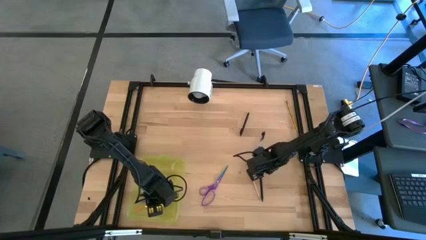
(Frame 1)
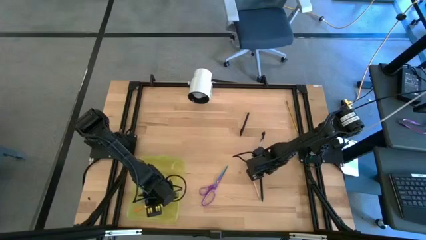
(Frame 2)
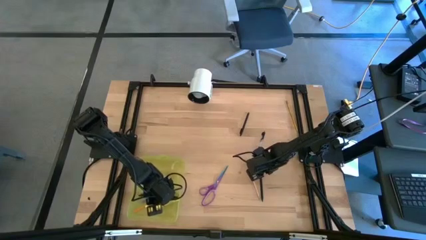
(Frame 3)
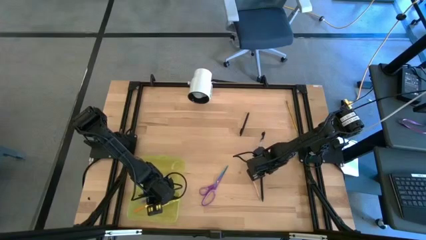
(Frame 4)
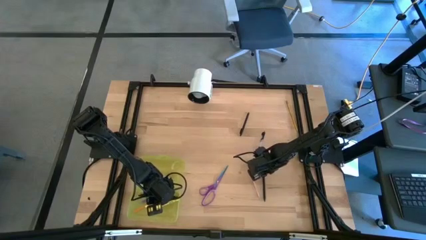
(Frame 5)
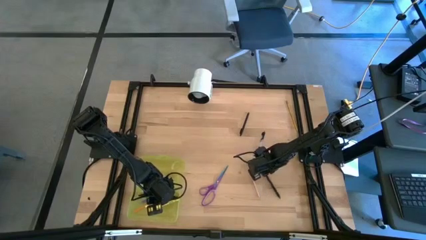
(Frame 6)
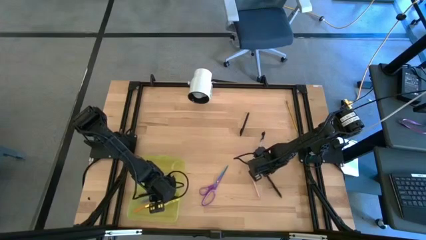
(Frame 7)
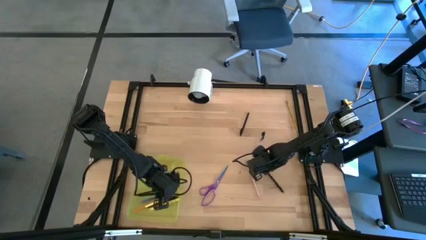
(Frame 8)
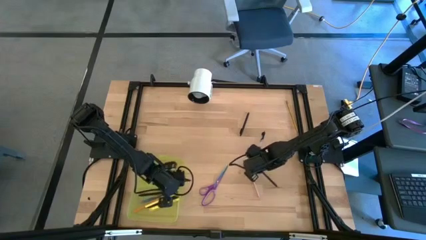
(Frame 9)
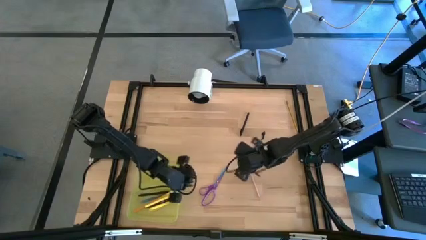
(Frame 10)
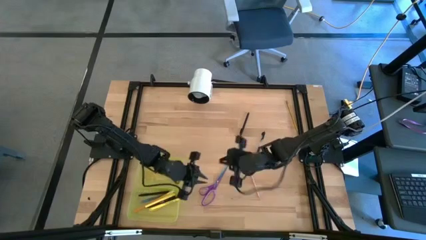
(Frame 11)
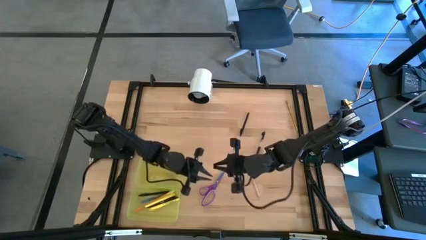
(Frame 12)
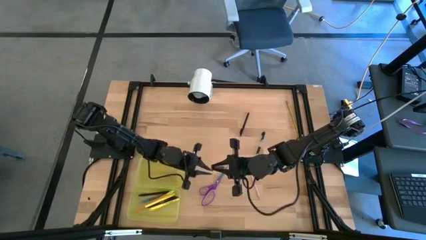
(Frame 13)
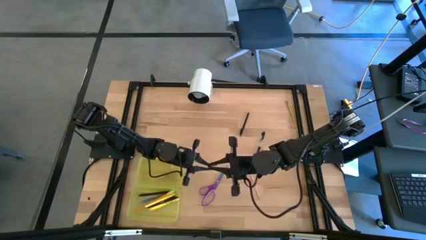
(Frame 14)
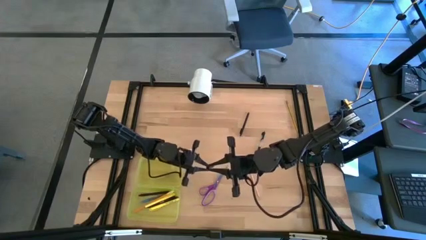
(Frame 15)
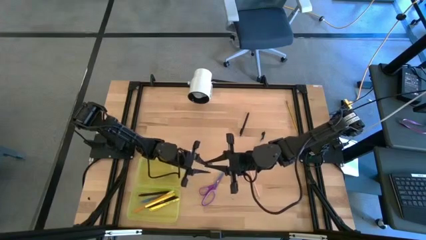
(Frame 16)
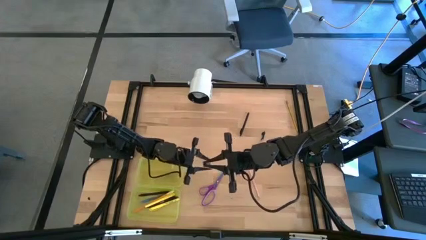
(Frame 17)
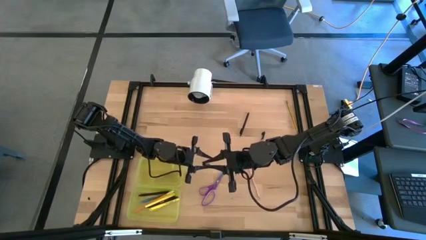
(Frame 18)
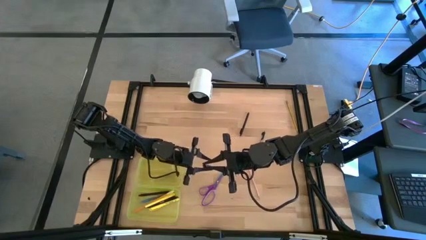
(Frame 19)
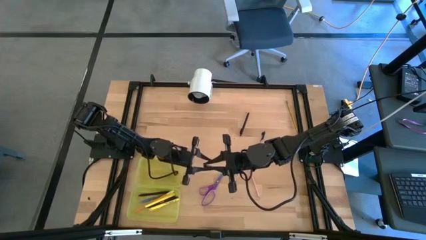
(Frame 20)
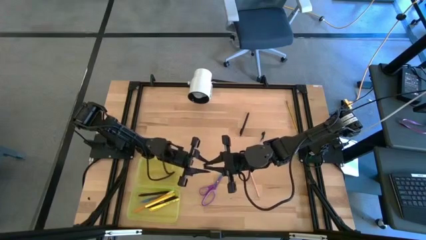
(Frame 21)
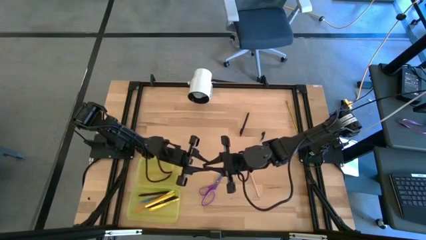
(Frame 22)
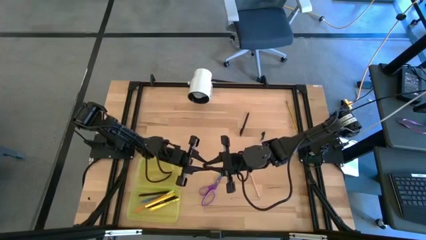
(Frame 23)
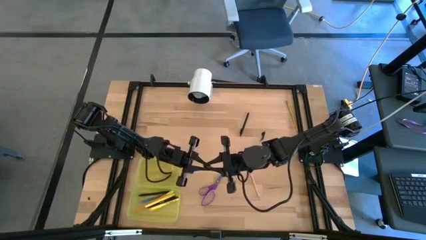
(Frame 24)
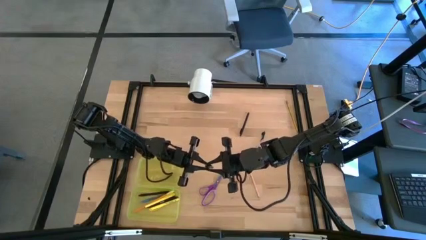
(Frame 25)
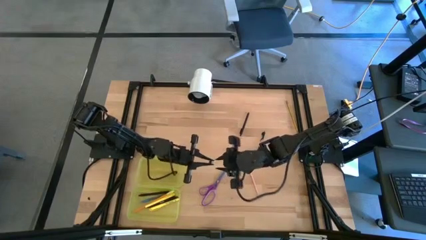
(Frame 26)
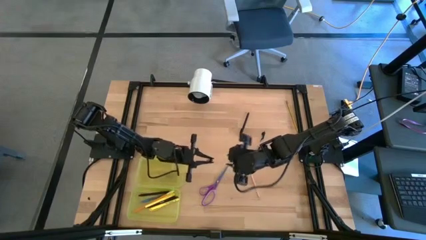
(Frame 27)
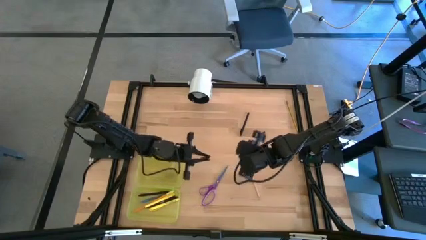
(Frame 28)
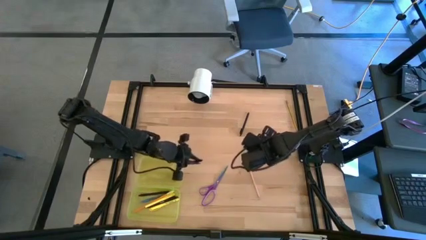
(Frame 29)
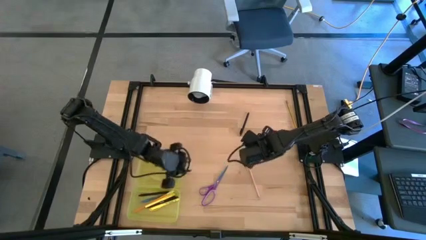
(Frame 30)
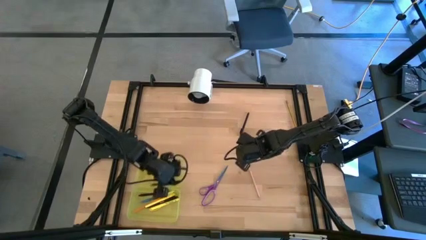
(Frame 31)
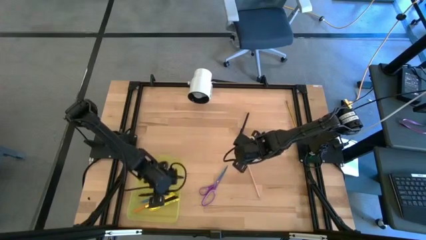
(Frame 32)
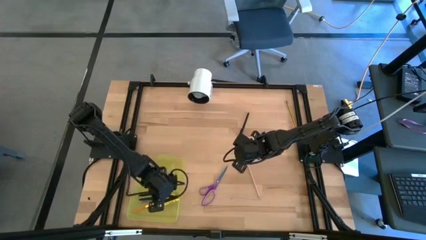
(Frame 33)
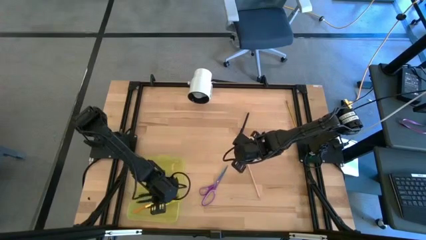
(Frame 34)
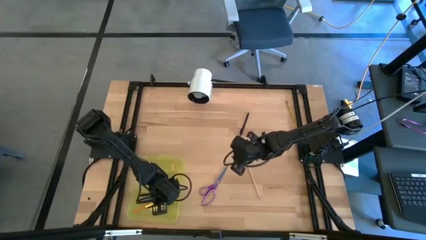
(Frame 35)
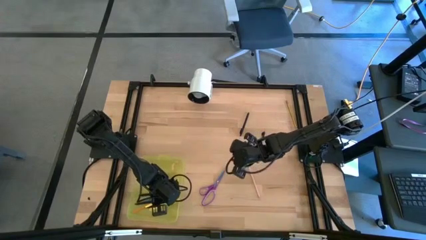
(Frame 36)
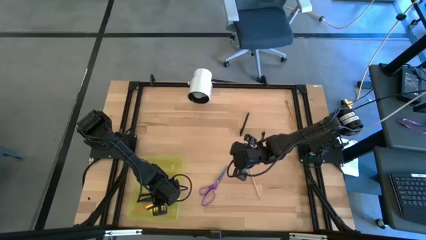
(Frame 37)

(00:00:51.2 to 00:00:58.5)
Task: Pick & place school supplies into a supply box
Put the black pen into the yellow supply box

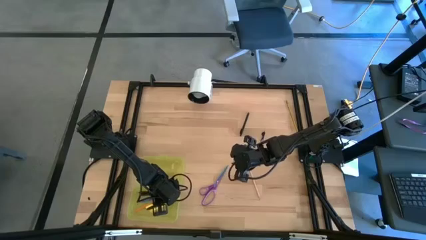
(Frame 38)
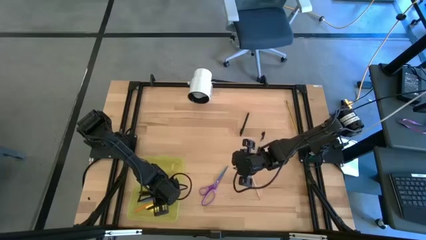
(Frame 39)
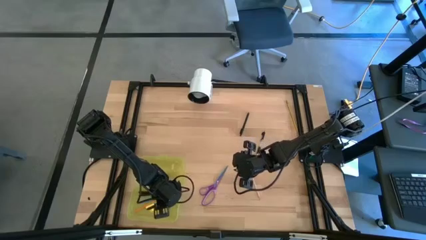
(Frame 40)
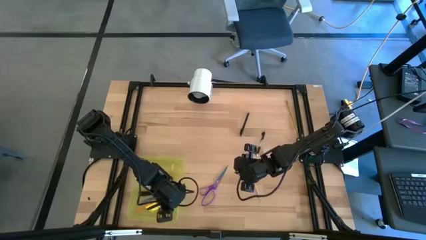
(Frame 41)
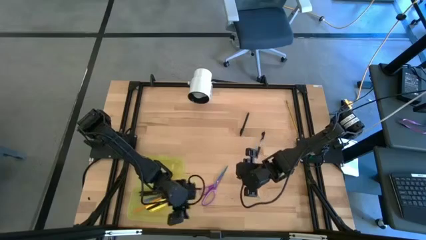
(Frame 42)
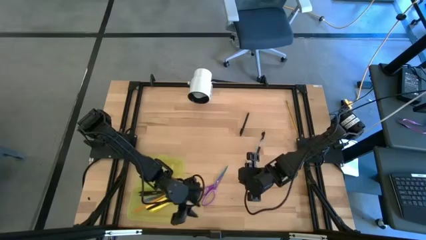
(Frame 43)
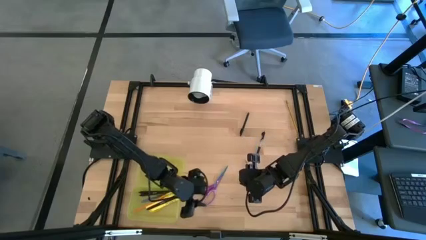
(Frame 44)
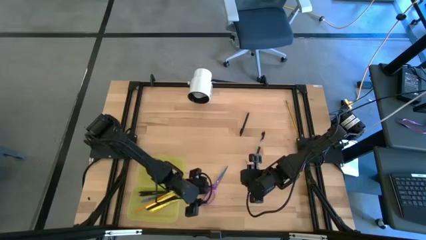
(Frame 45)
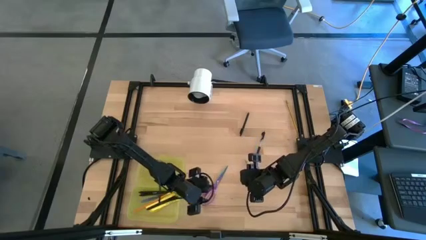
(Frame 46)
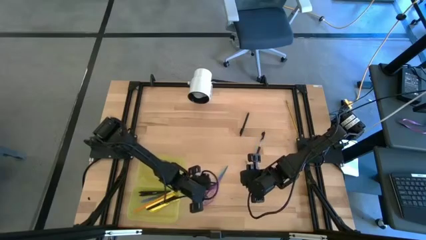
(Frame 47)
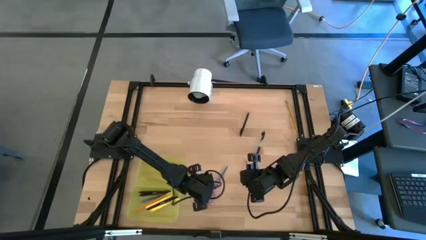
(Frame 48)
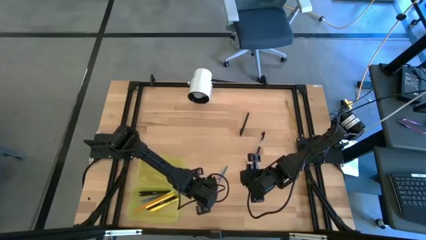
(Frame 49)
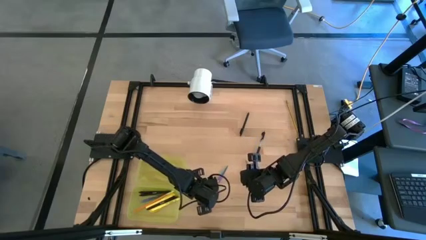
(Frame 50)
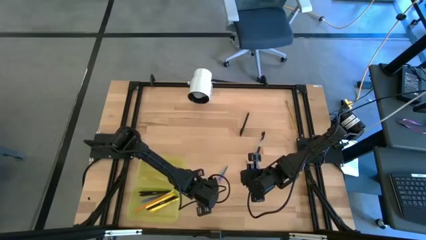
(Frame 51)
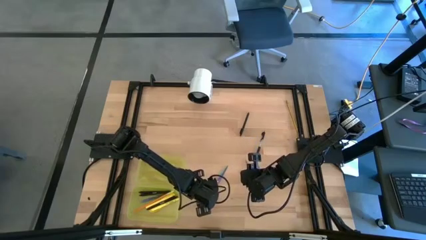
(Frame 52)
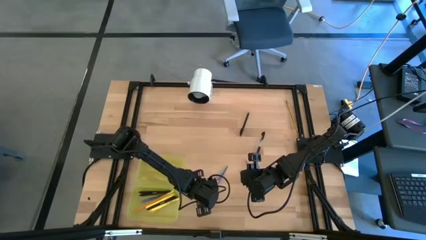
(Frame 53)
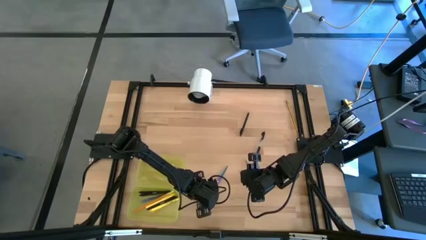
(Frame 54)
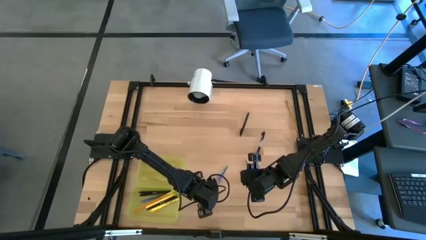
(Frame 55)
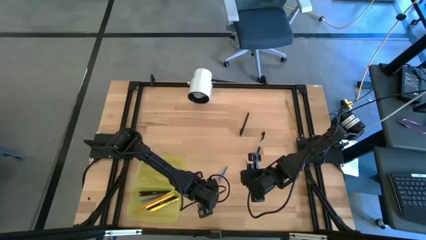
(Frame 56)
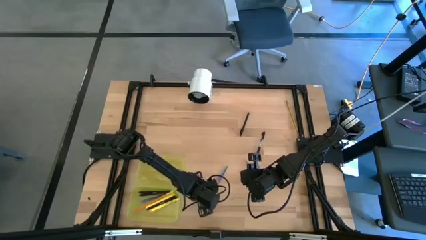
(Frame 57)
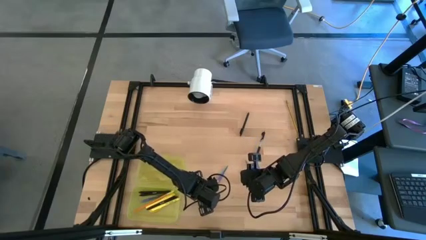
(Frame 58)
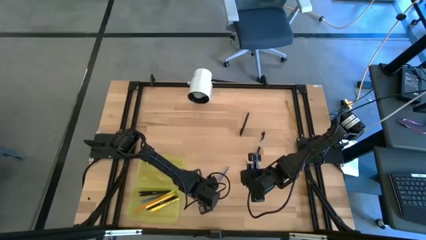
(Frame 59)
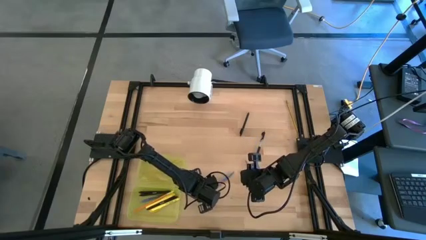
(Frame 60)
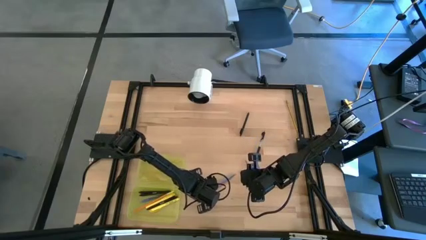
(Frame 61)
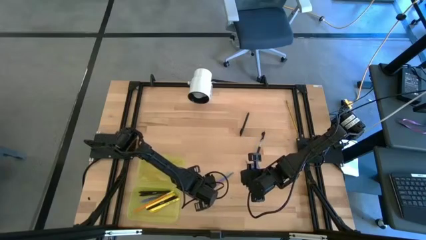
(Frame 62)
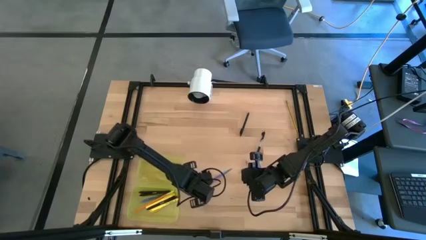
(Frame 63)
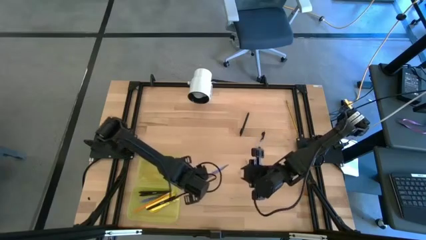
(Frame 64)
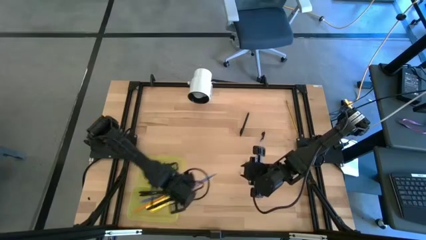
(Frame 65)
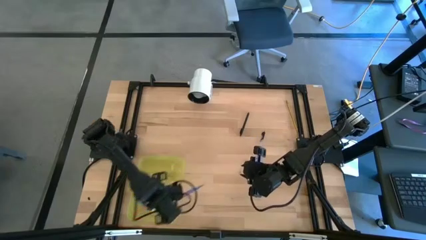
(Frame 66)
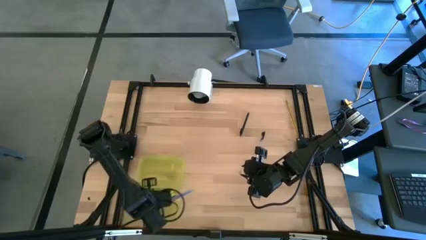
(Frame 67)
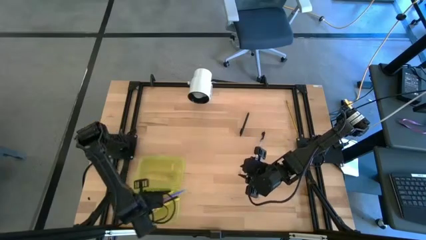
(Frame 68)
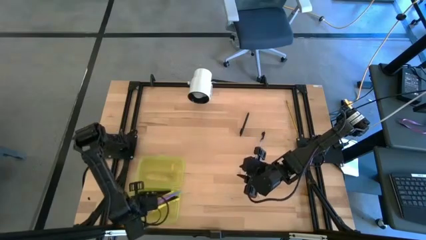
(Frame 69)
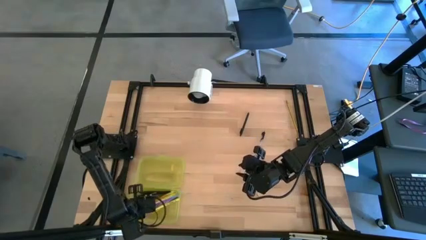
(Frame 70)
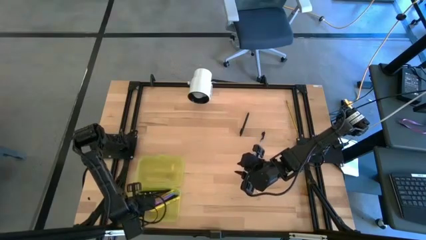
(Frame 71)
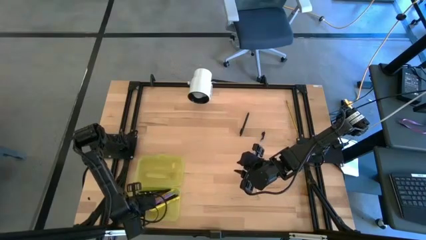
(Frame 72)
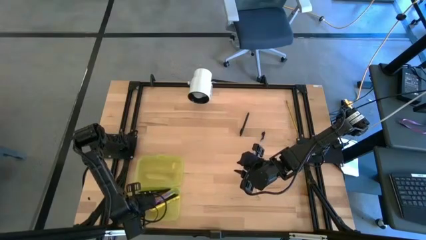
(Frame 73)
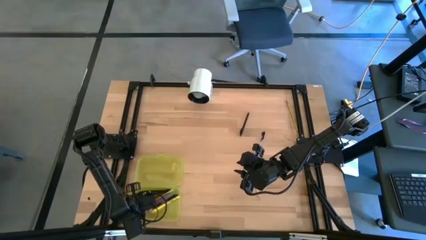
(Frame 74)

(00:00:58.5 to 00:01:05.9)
Put the purple scissors into the yellow supply box

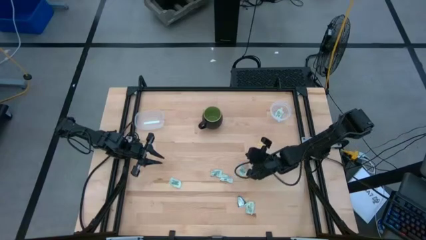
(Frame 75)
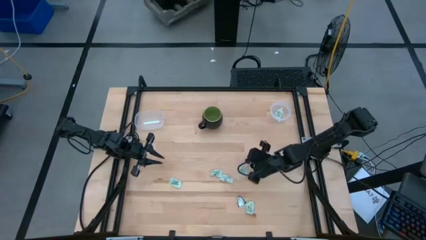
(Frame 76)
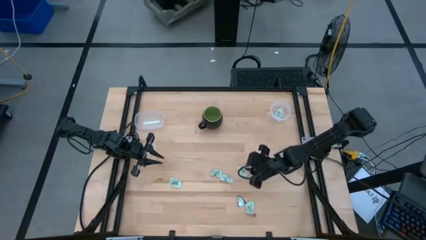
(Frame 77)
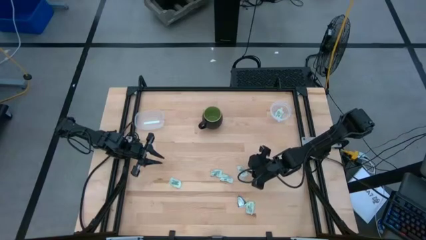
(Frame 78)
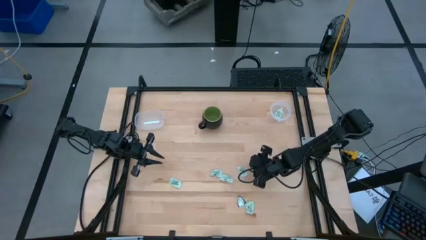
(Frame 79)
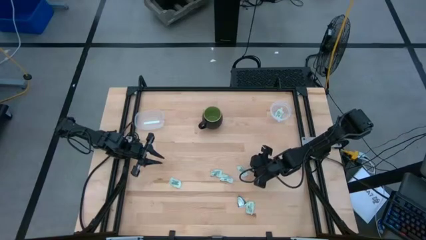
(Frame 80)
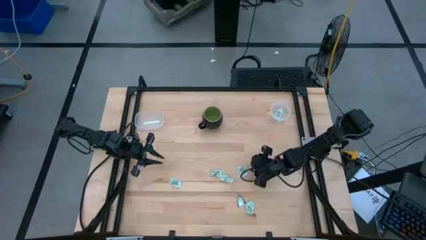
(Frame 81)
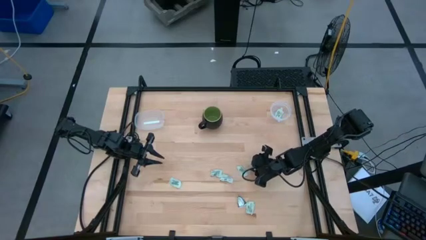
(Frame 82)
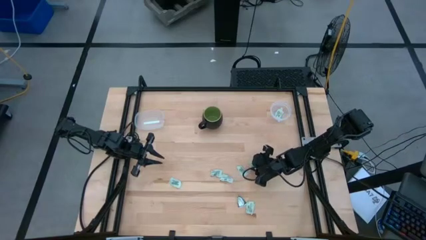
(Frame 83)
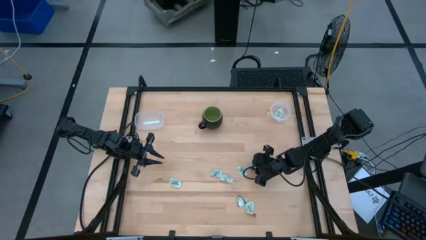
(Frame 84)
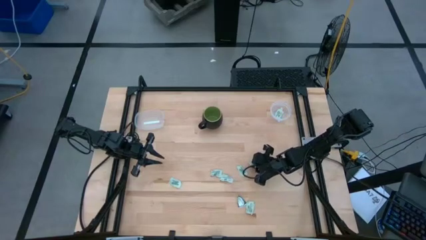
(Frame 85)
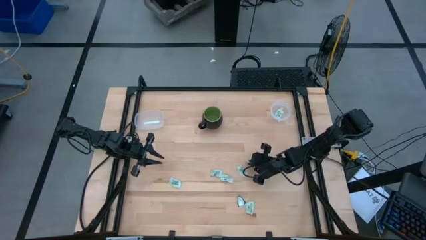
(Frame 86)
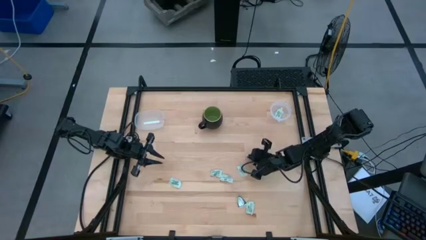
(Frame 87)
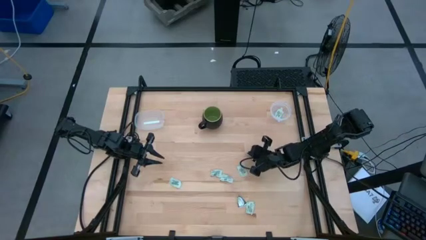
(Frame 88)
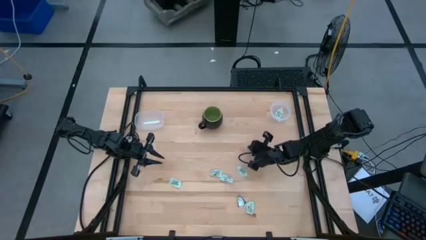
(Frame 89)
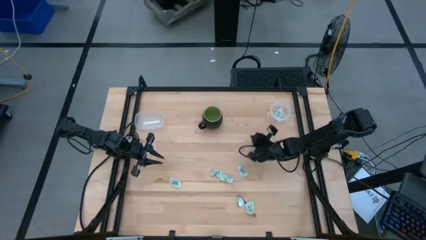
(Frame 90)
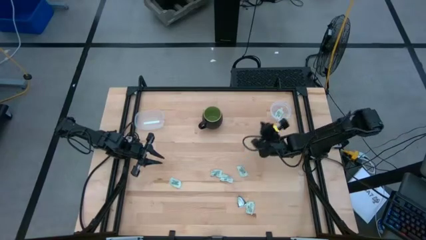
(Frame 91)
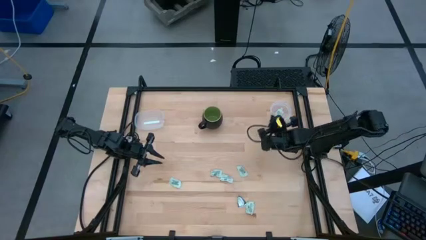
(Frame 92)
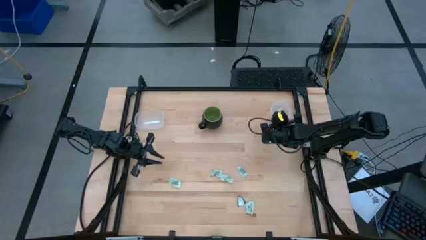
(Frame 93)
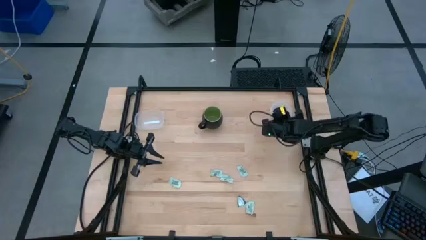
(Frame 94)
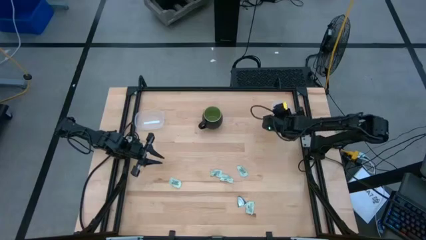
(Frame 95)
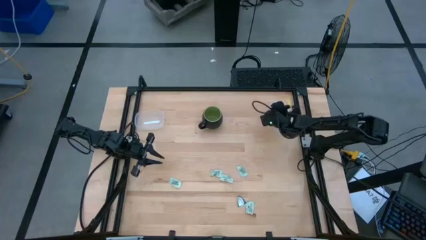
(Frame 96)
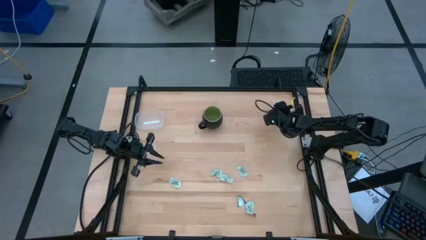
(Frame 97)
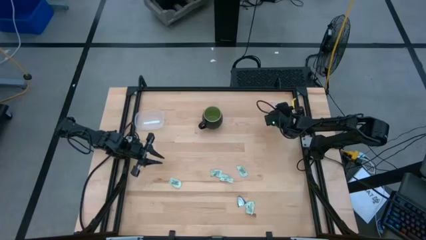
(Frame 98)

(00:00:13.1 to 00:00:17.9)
Task: Pick and place items into bin
Put the white stevia packet into the right transparent bin
